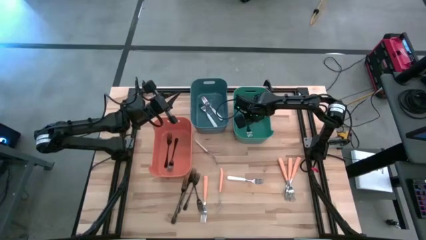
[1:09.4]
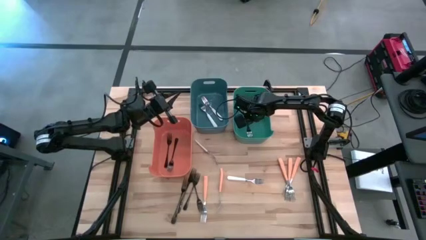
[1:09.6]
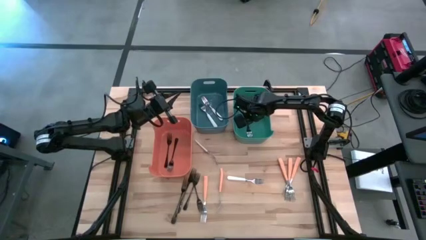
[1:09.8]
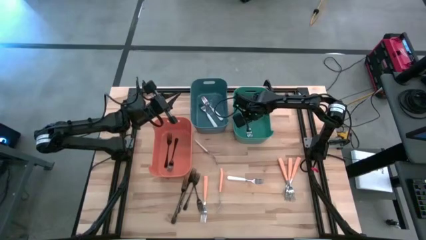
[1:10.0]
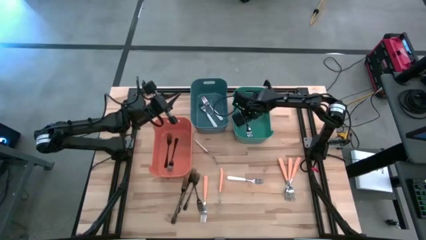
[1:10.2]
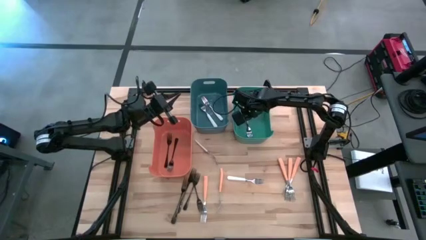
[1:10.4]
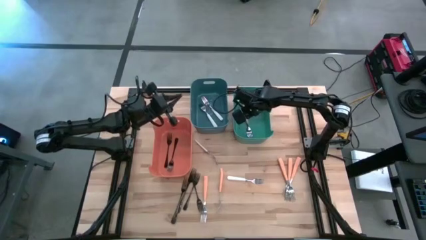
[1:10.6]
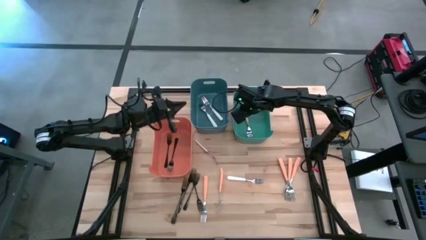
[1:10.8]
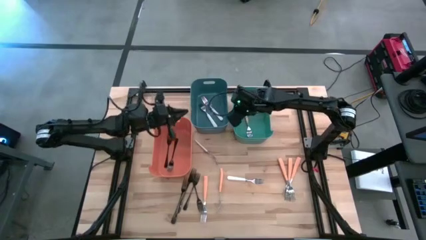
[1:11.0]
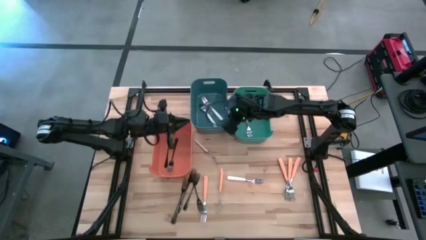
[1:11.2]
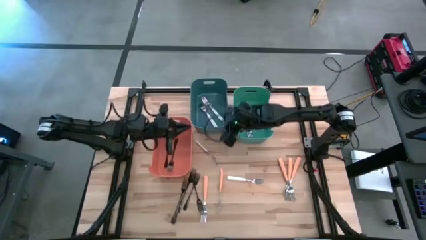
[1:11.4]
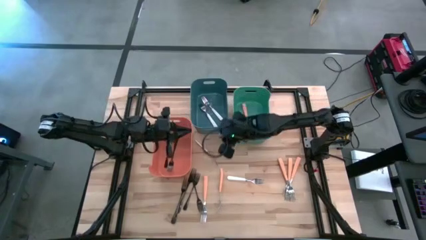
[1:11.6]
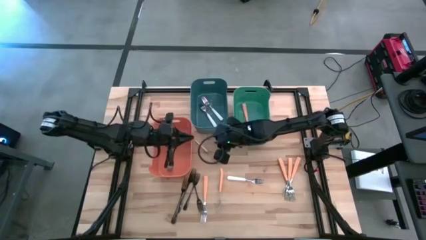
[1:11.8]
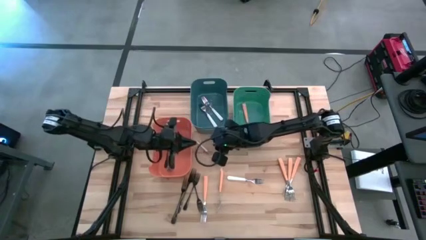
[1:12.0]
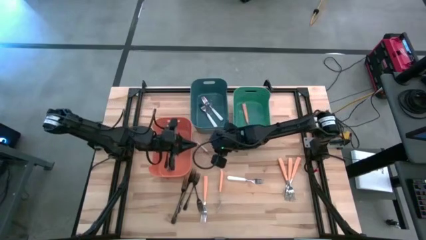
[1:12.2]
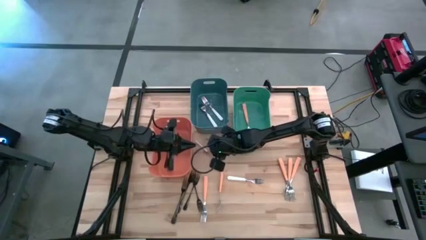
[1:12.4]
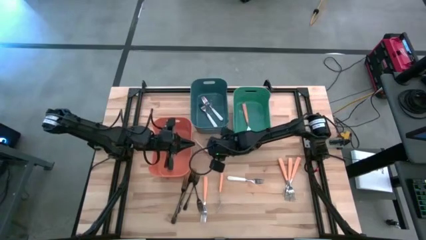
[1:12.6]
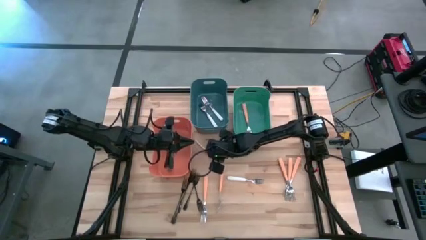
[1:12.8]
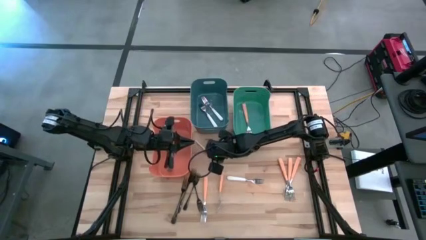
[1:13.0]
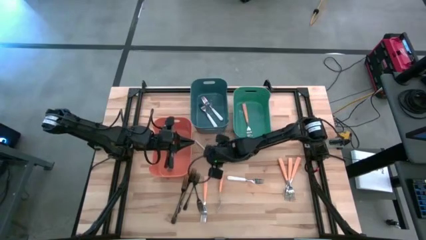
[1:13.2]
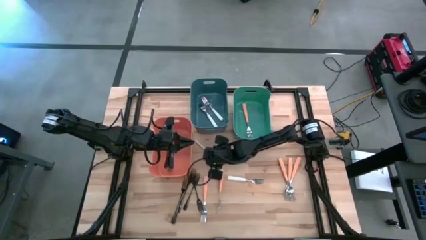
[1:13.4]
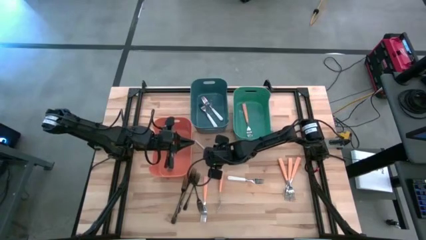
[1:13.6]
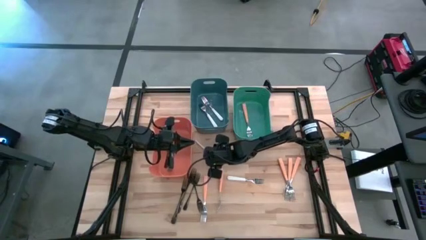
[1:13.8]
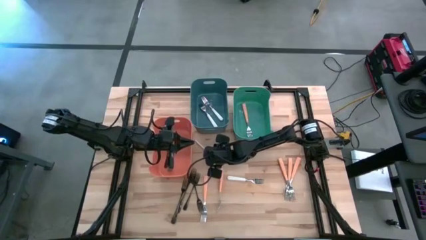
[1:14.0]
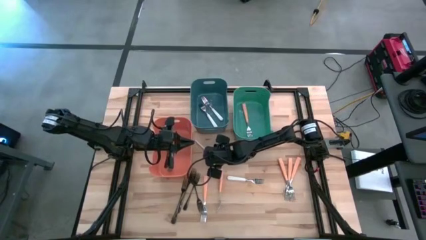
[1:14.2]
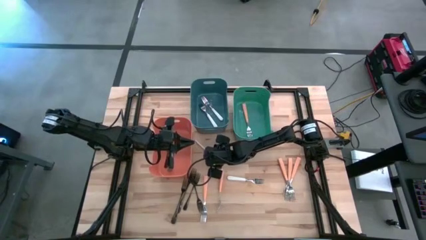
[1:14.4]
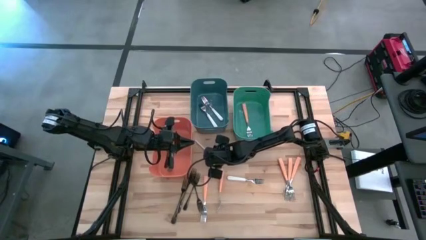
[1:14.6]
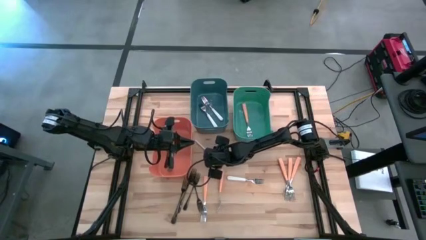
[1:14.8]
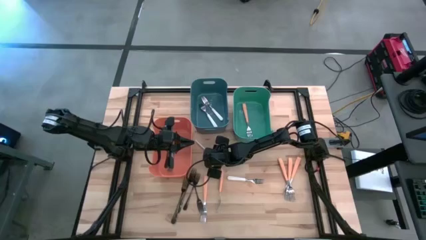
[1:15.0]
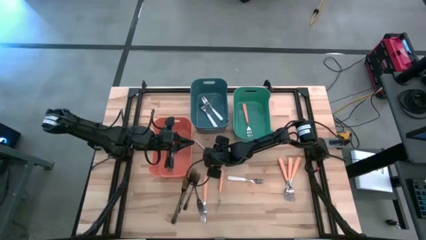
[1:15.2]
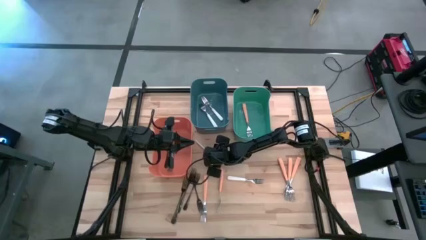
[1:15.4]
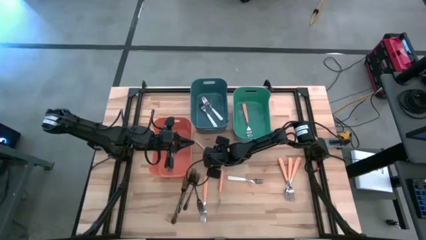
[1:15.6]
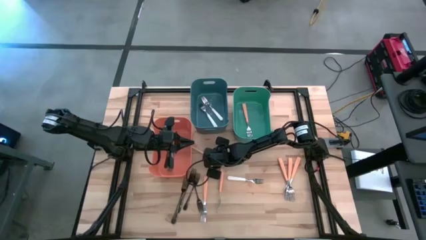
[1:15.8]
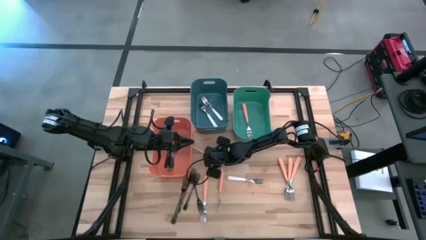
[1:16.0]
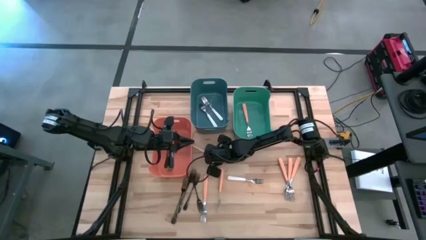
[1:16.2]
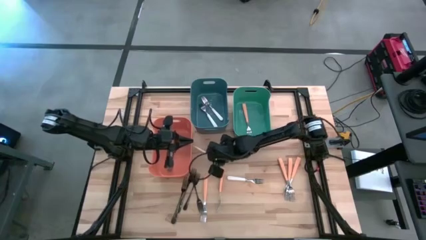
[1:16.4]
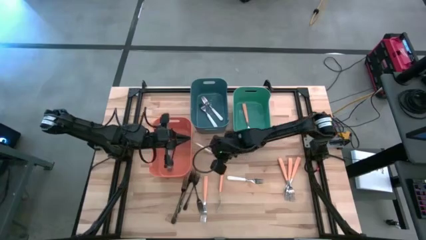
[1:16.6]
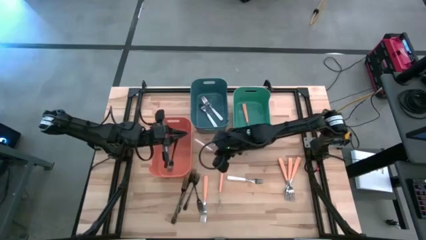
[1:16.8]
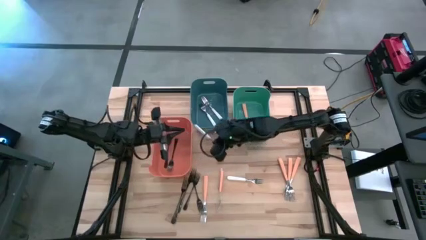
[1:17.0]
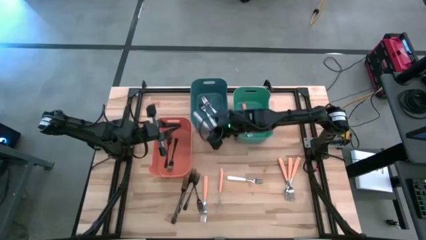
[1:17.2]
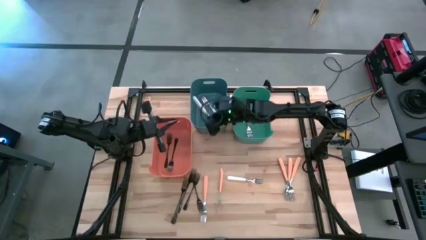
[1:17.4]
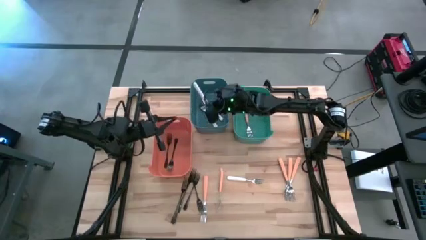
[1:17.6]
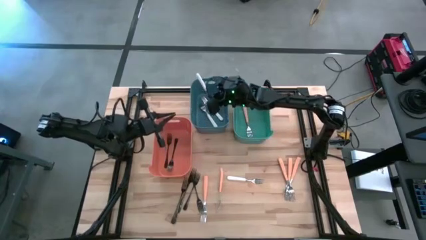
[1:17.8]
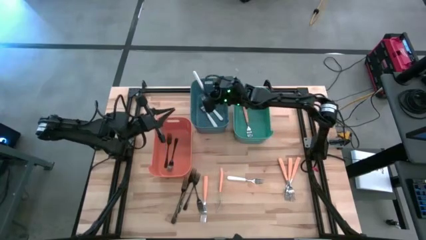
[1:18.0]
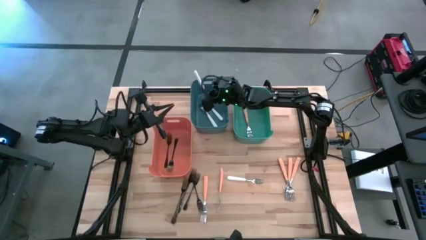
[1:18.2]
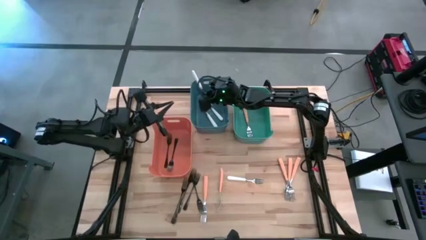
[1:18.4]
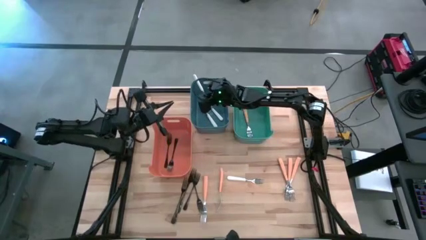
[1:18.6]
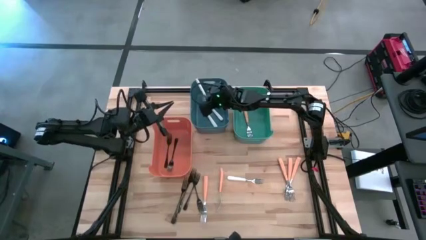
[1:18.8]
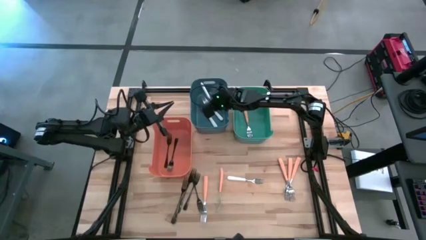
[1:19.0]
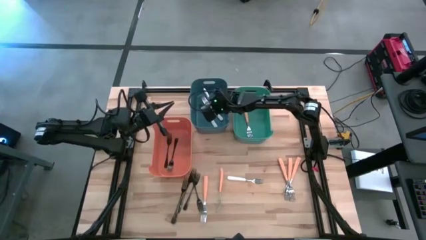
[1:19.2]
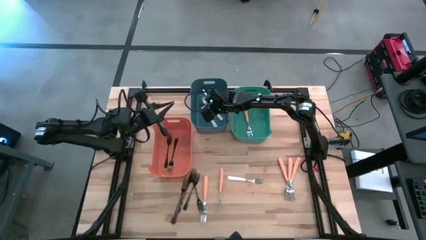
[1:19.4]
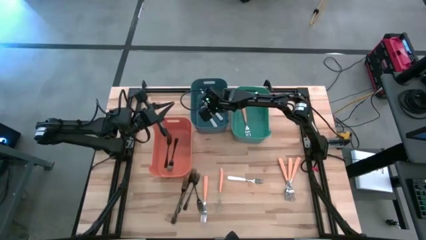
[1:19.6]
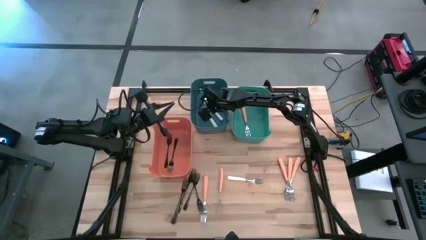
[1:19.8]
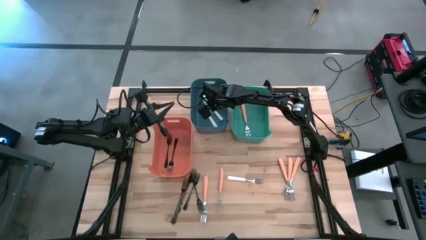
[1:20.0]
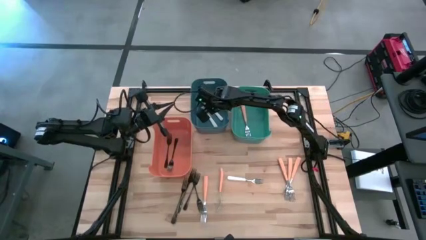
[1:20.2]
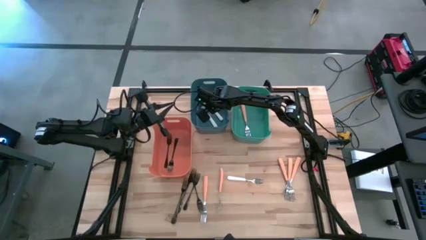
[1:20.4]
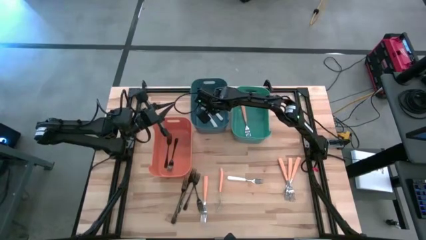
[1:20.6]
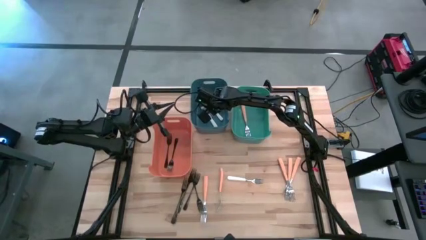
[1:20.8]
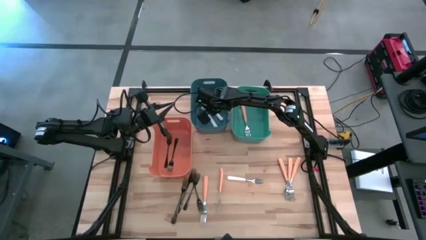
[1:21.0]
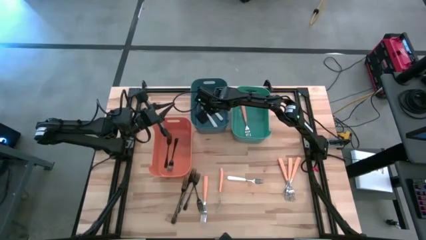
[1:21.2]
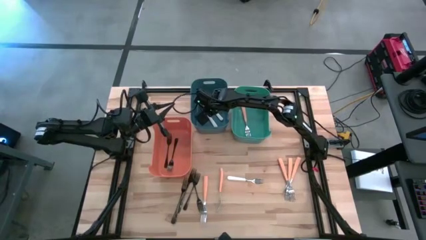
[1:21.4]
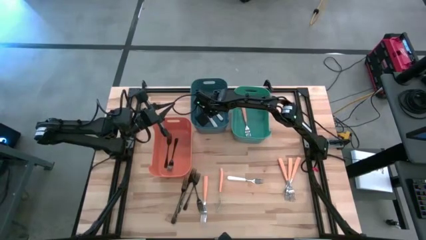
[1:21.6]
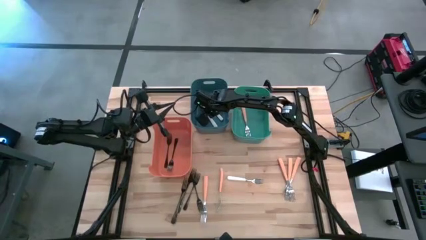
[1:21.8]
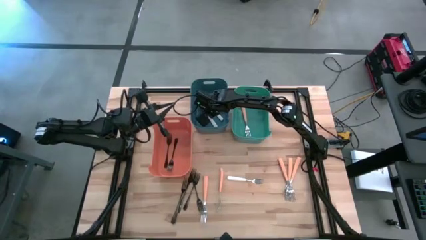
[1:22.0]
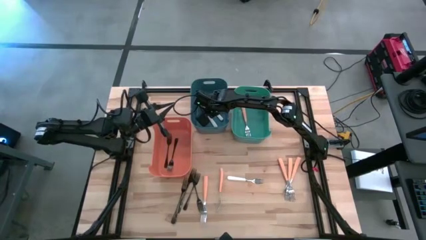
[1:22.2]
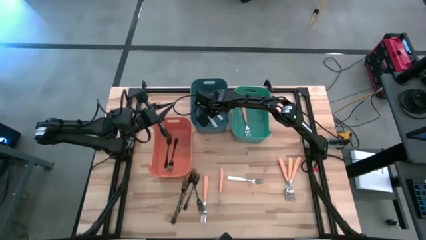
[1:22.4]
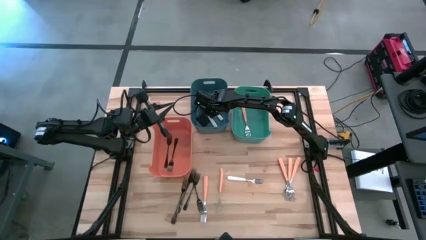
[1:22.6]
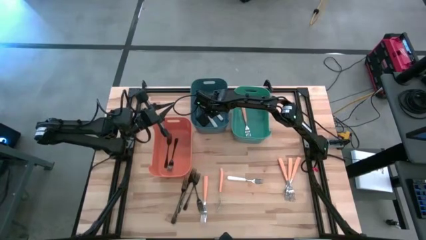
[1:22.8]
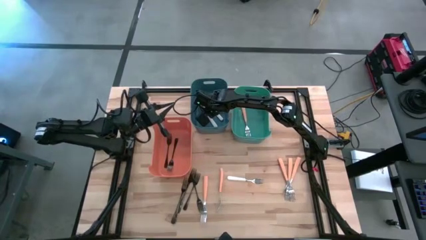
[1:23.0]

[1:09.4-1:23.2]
Task: Sort silverware by color (type)
Put the white fork into the blue bin
